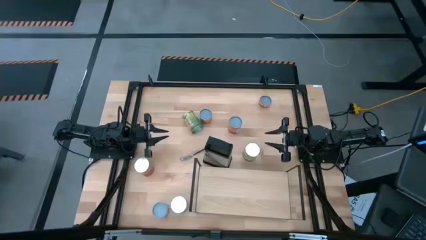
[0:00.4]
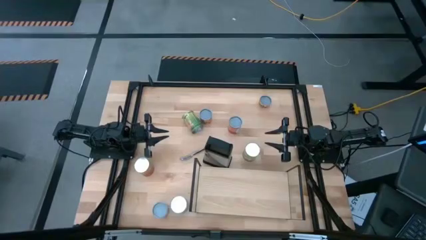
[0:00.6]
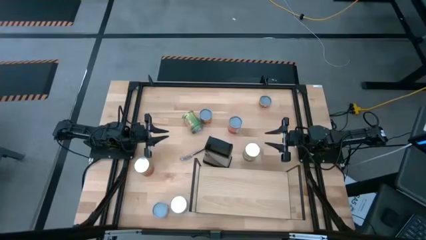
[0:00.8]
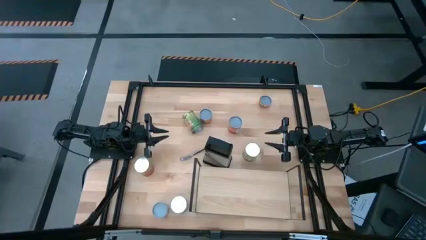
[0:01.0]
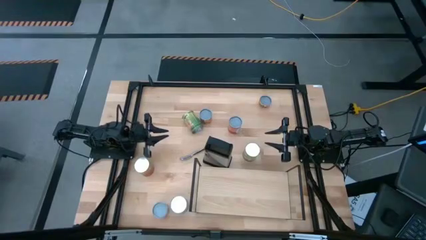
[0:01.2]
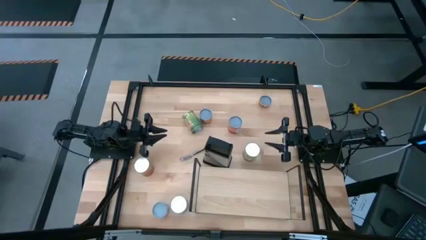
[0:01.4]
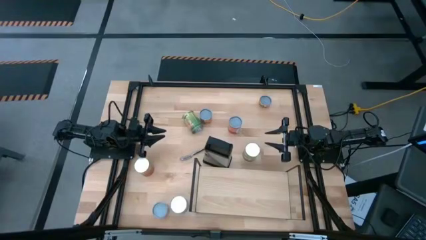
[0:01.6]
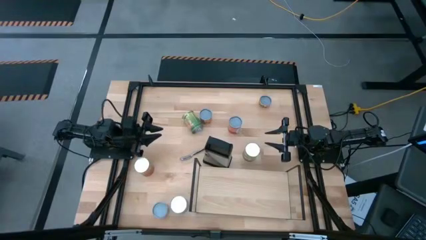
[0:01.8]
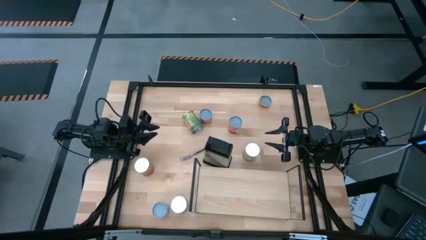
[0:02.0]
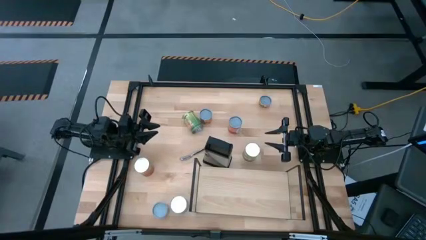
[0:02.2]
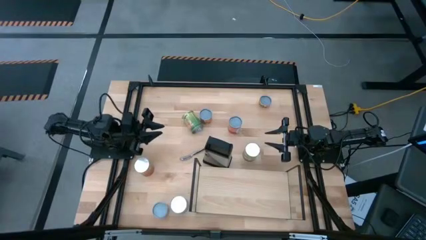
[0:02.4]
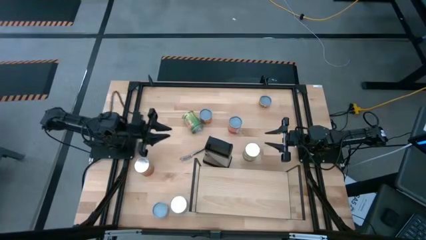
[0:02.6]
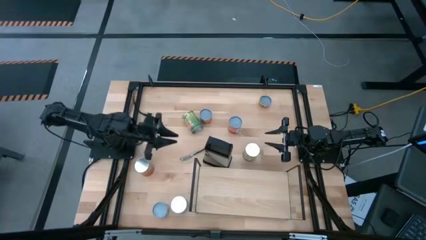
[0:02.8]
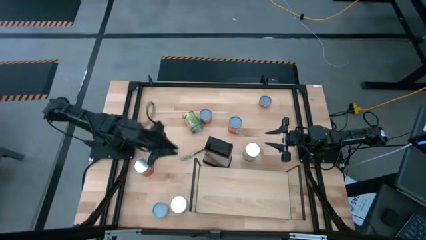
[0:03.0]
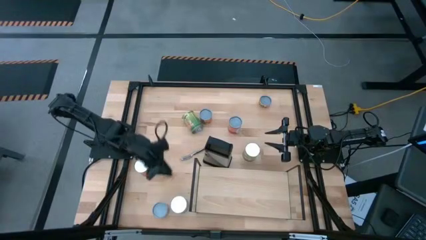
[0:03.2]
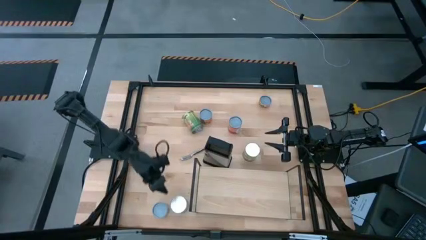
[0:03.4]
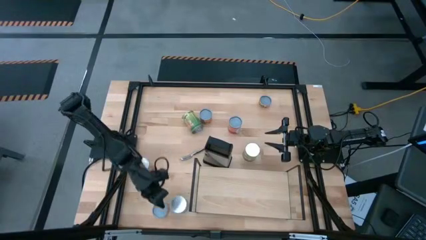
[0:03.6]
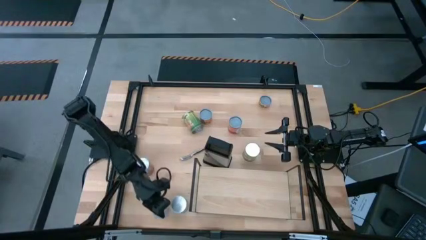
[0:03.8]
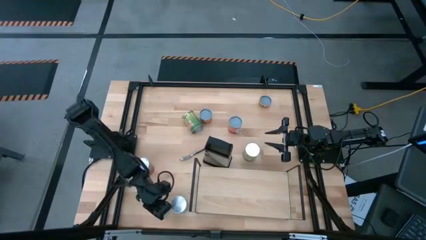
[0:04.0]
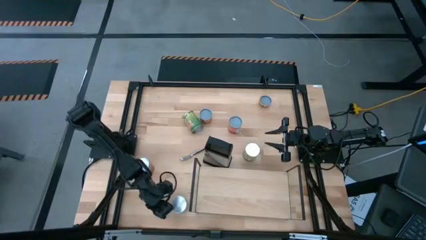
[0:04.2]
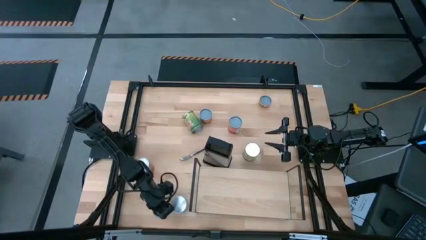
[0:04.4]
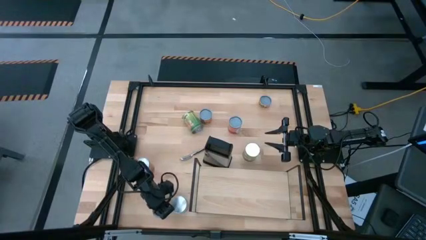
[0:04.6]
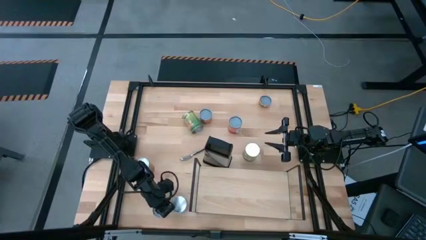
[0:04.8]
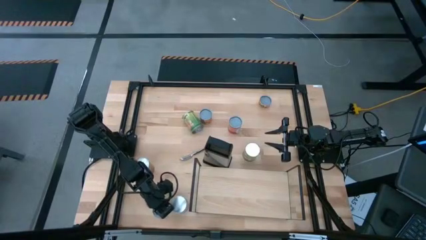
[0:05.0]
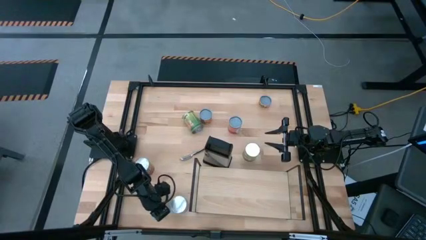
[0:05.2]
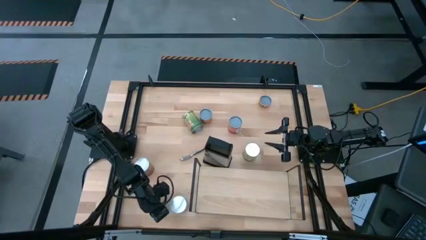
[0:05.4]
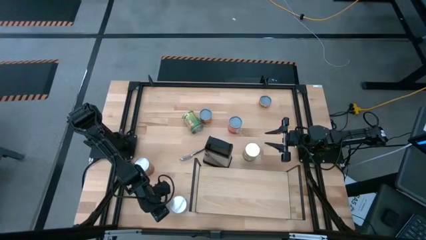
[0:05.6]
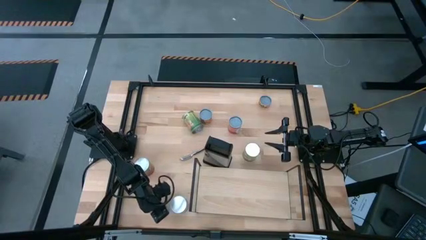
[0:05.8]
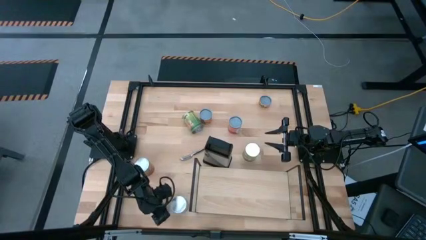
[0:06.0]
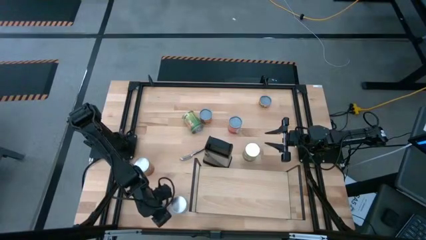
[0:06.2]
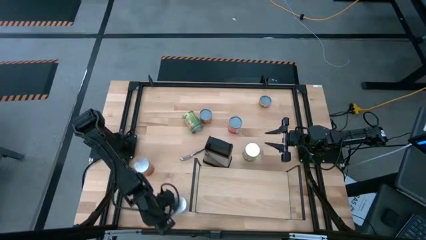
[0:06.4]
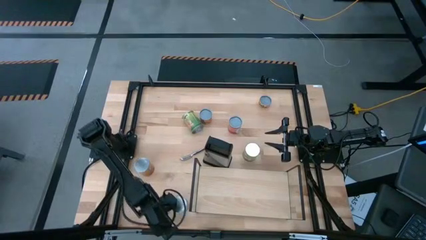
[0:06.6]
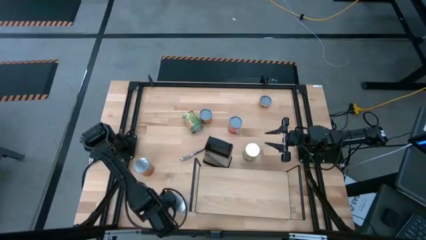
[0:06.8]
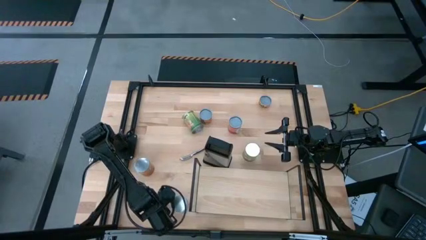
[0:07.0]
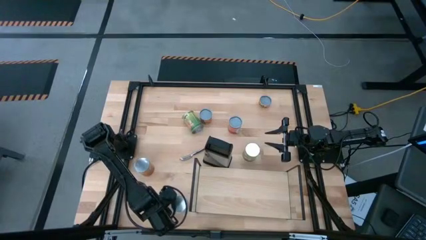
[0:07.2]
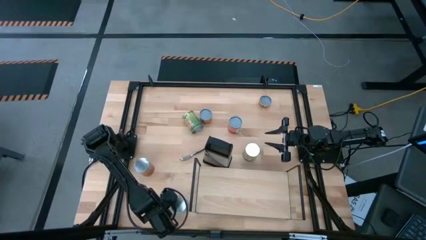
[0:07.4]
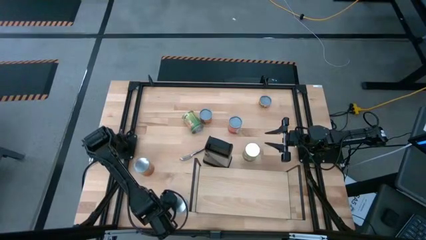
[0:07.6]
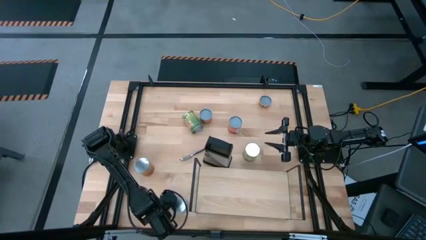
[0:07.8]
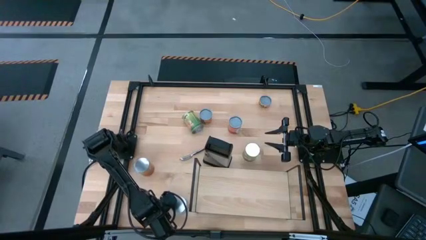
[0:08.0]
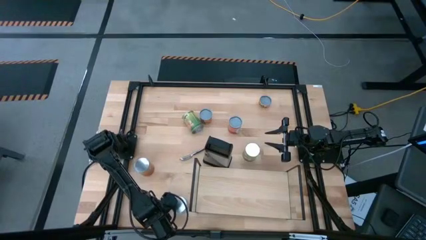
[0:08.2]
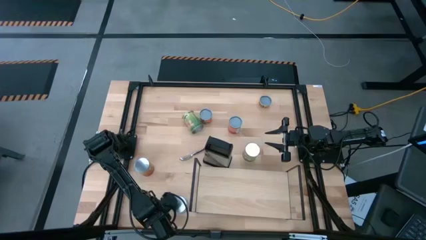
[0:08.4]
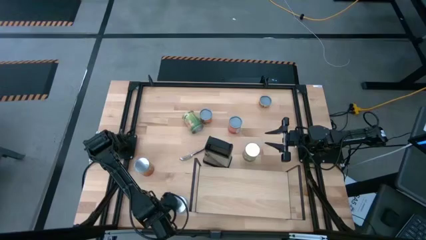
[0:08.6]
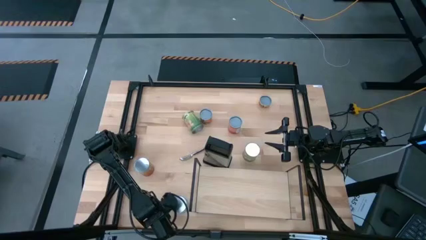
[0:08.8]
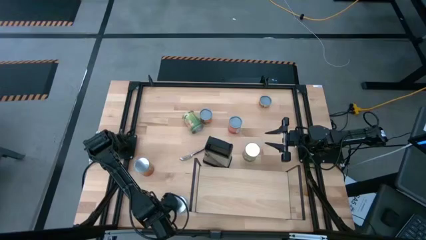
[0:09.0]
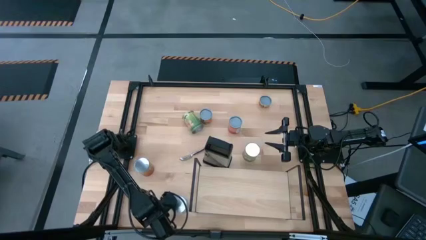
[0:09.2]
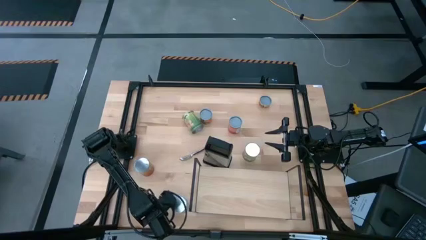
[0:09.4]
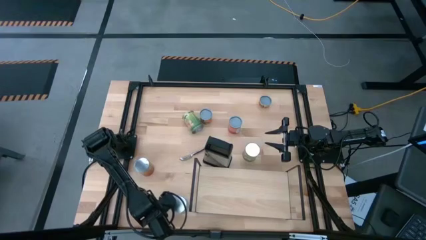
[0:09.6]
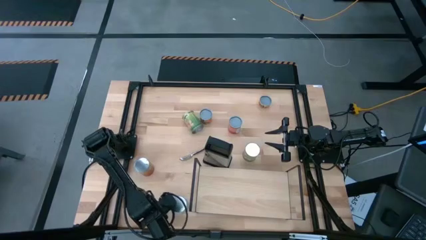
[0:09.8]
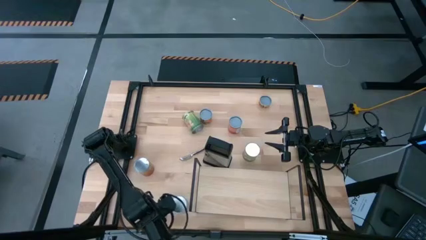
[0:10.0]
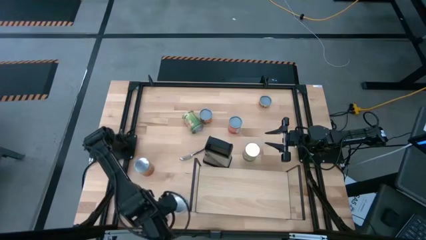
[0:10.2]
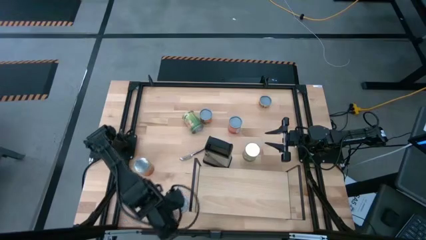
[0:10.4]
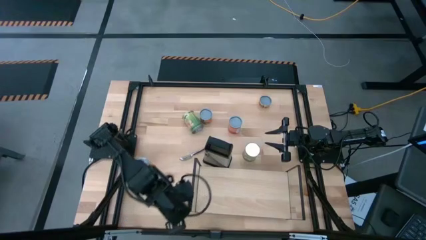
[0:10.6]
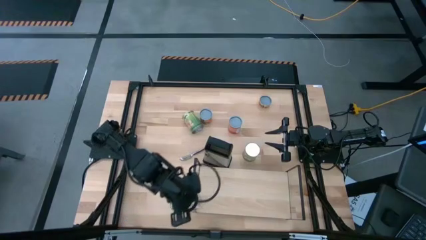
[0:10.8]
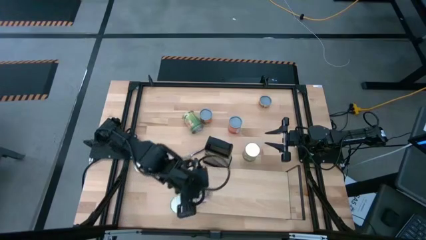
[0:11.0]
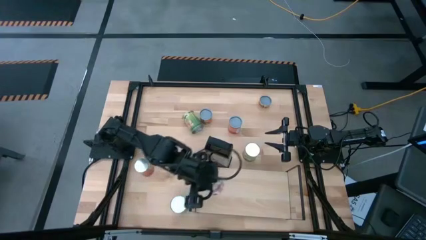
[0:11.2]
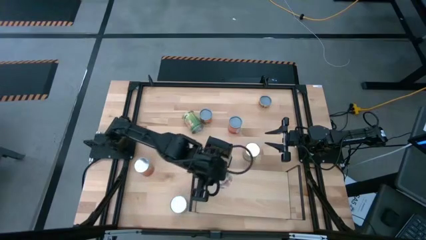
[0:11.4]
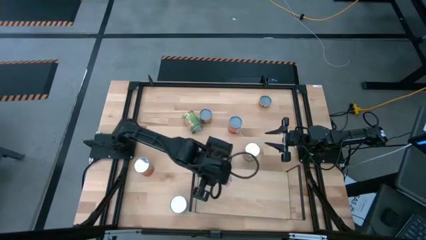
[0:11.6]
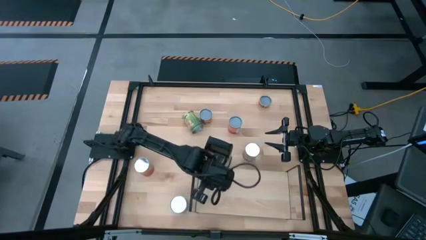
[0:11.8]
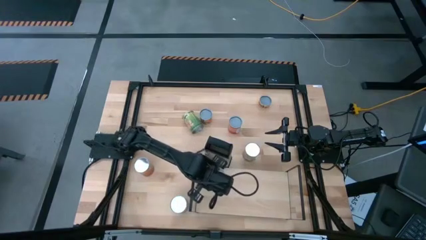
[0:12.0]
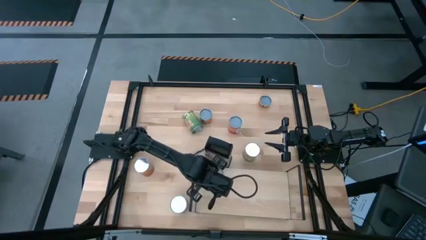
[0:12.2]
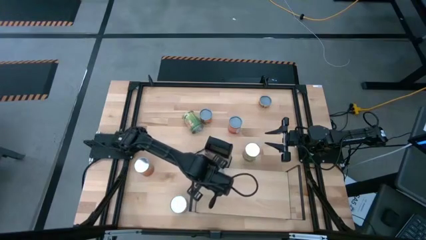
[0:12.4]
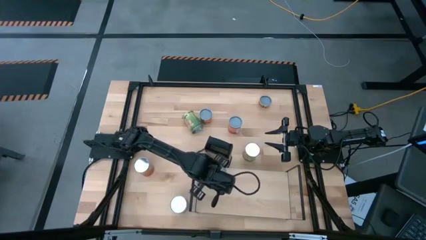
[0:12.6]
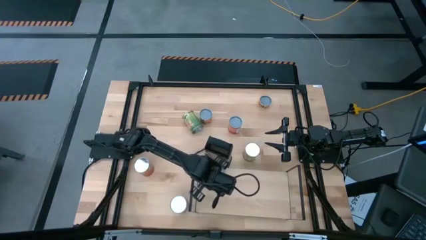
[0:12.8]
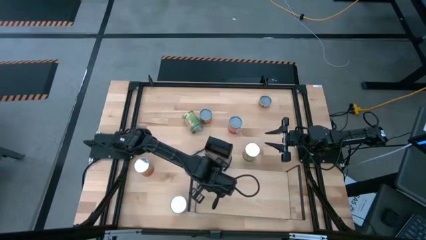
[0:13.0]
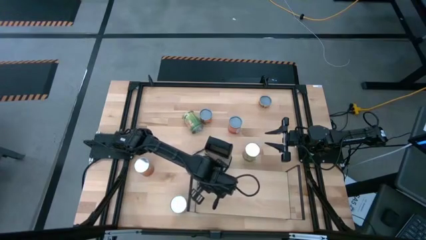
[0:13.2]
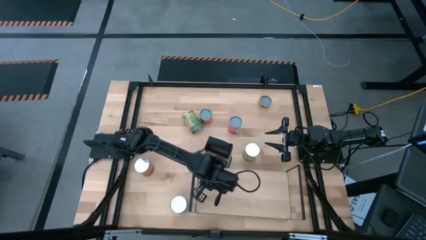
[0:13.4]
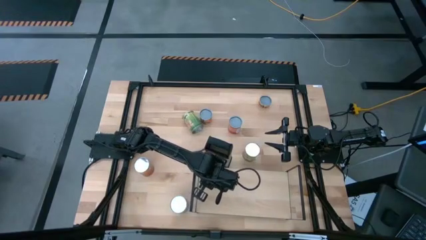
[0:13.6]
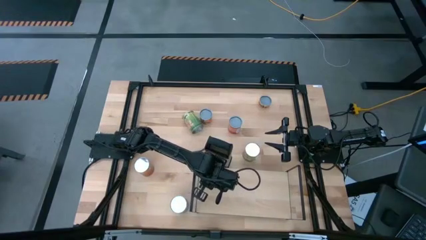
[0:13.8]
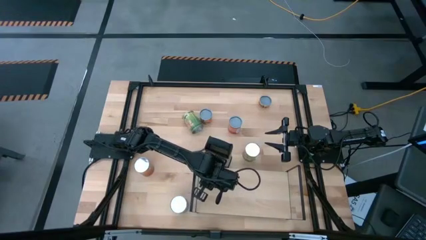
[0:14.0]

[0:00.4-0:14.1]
Task: Pick and place cans onto a shelf
Put the canned diced tomatoes on the shelf
